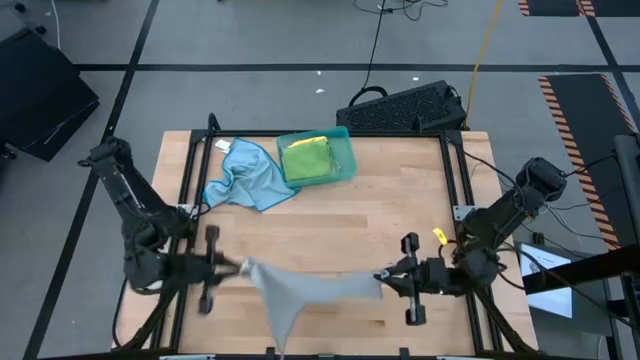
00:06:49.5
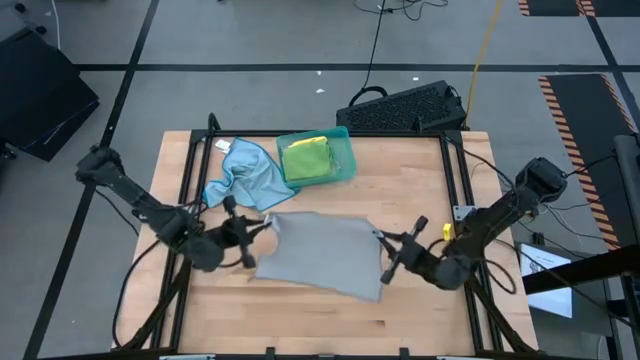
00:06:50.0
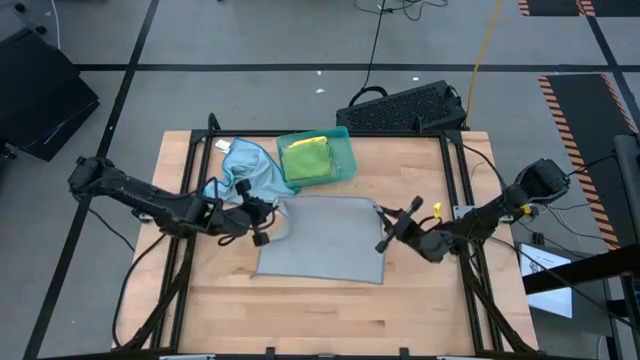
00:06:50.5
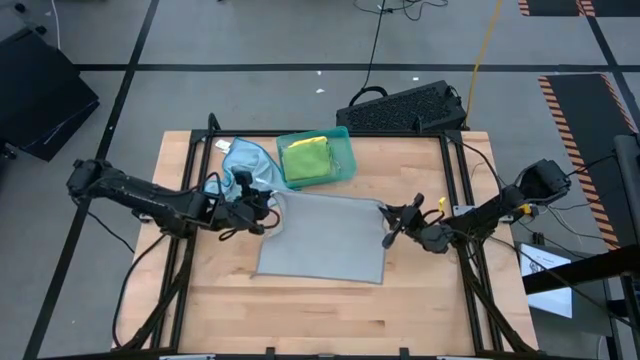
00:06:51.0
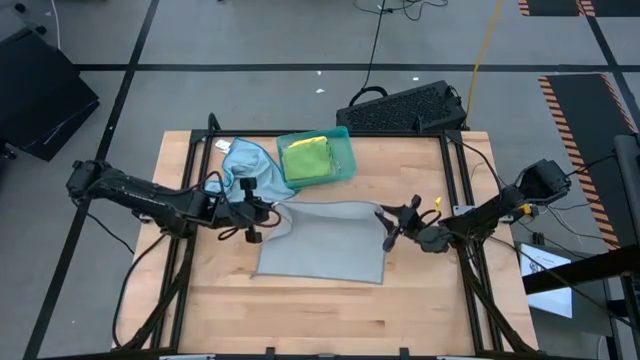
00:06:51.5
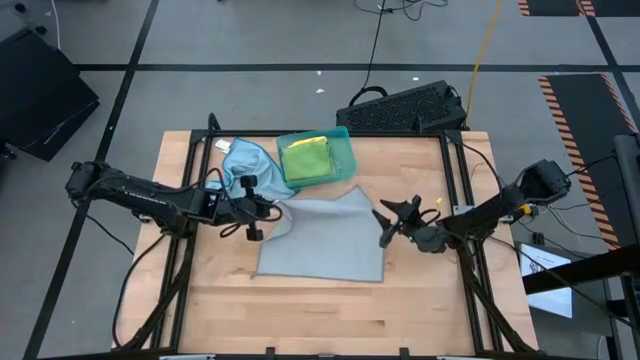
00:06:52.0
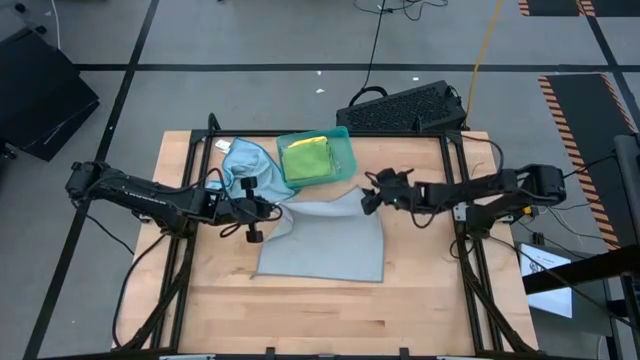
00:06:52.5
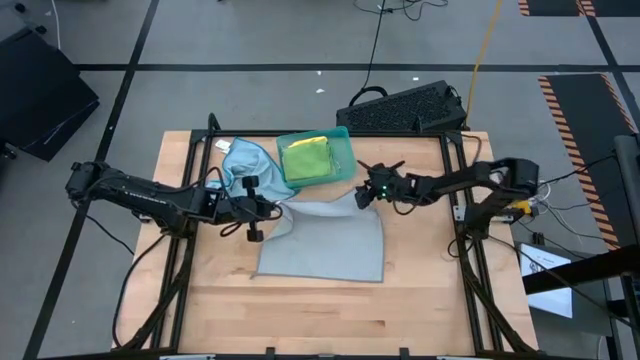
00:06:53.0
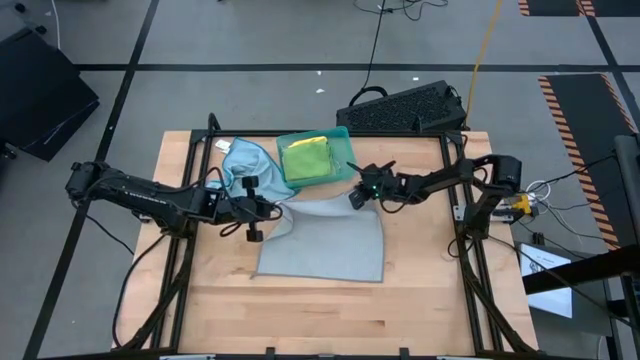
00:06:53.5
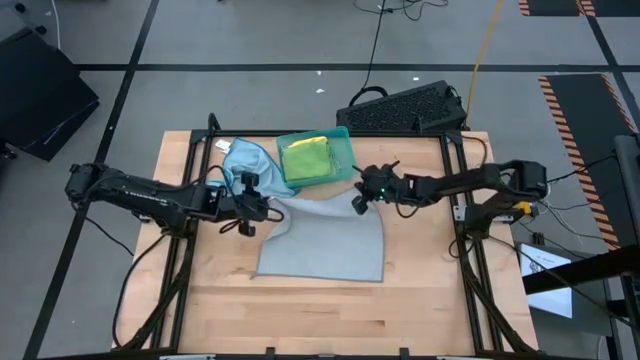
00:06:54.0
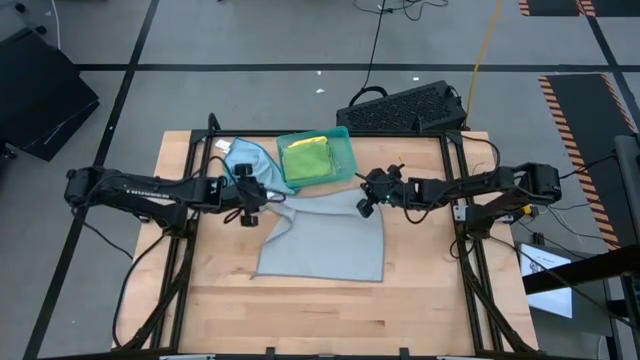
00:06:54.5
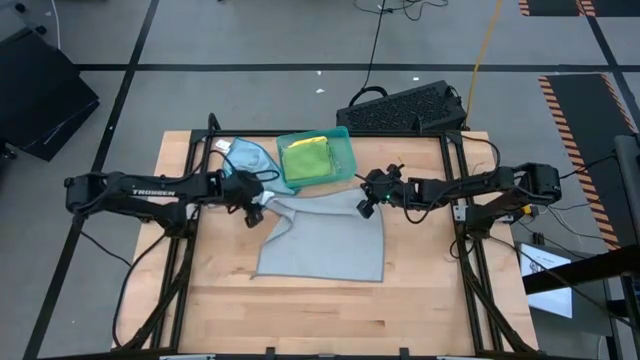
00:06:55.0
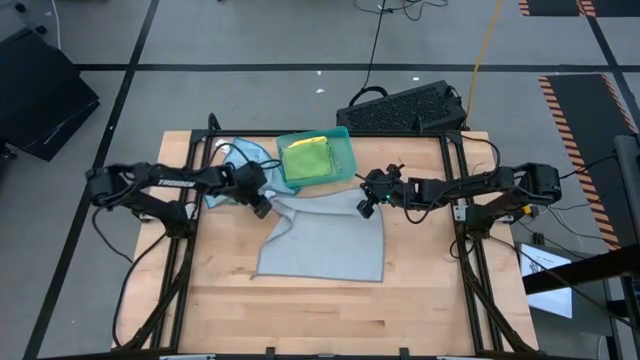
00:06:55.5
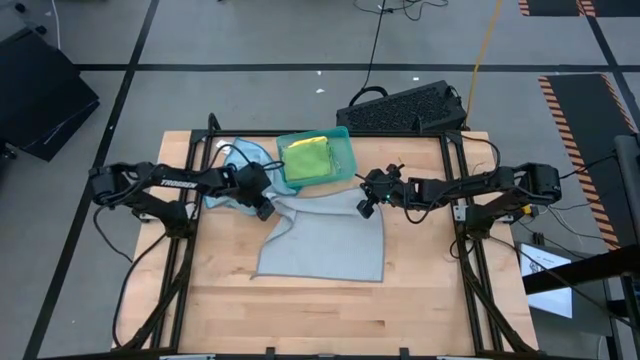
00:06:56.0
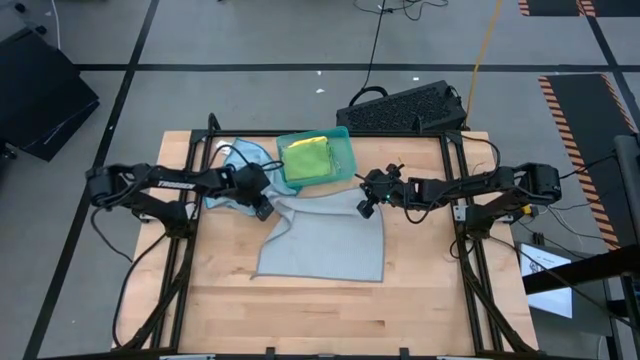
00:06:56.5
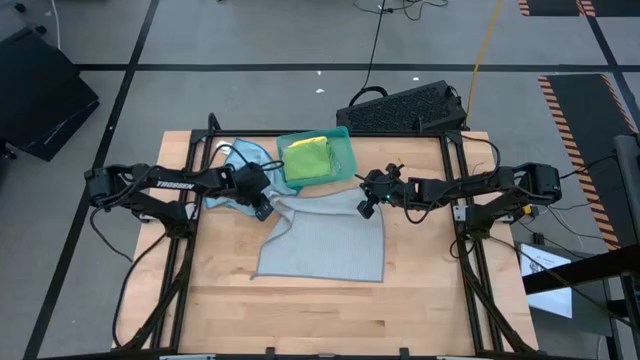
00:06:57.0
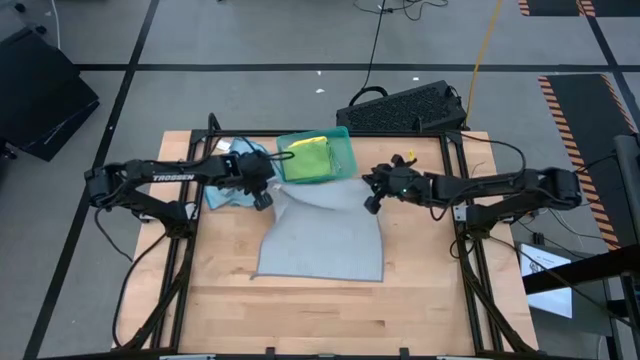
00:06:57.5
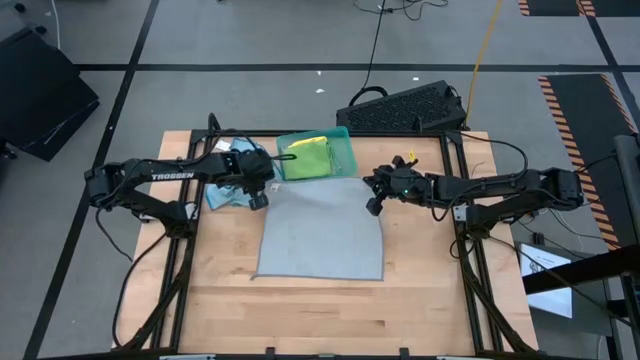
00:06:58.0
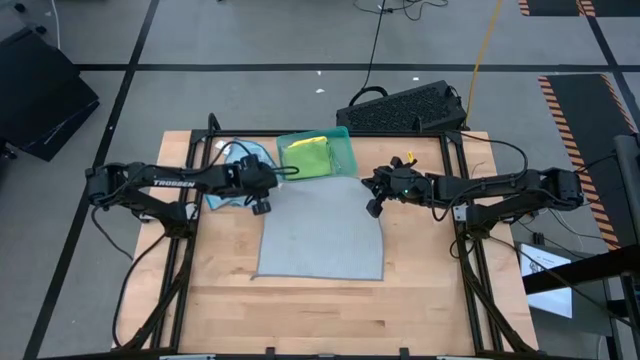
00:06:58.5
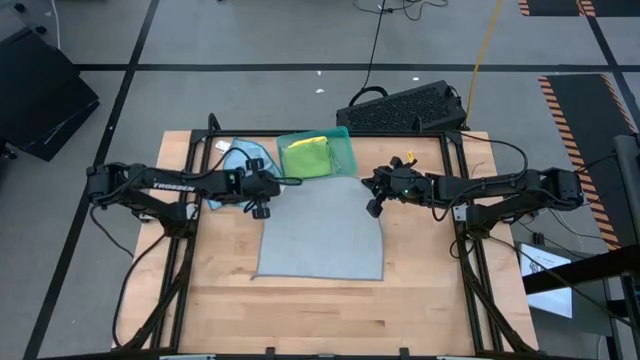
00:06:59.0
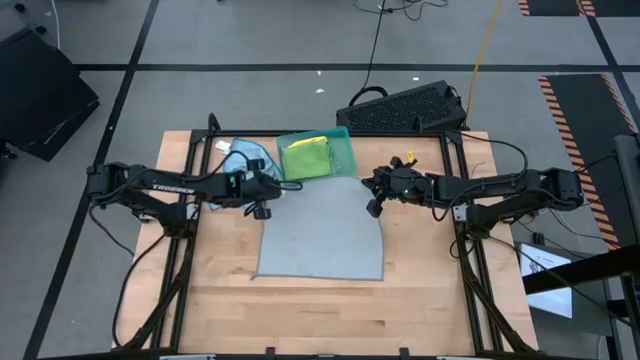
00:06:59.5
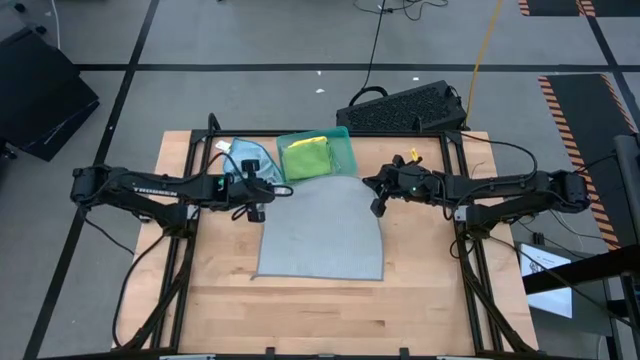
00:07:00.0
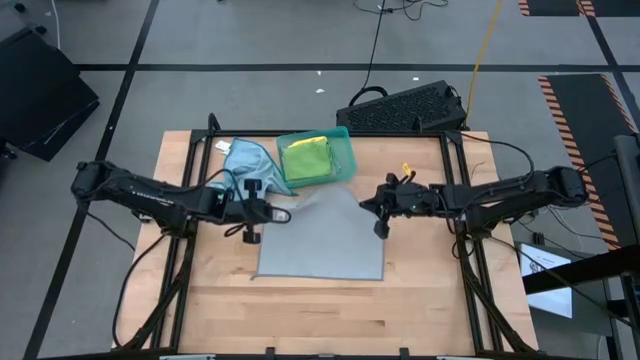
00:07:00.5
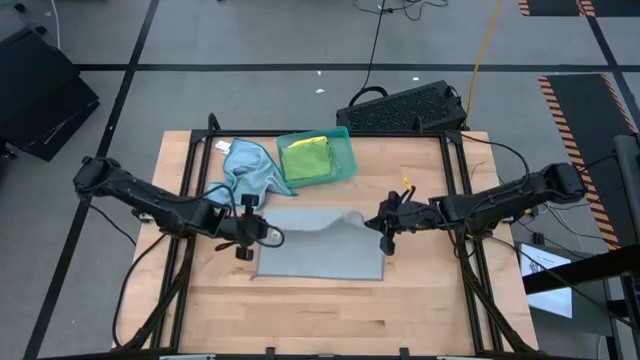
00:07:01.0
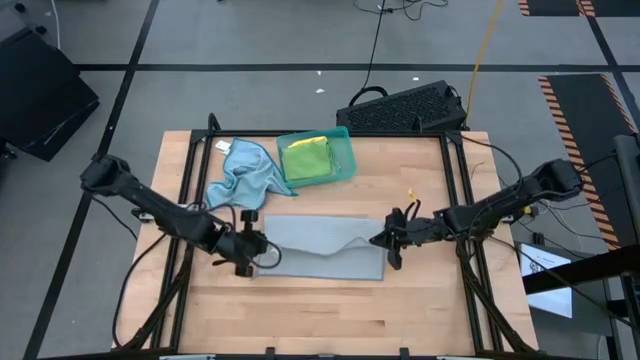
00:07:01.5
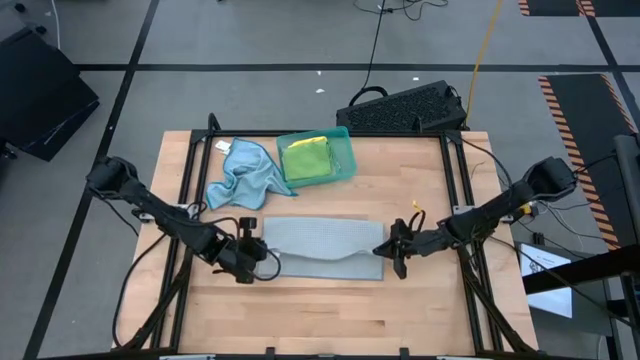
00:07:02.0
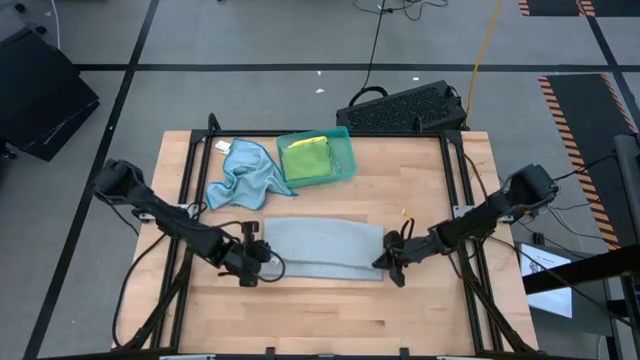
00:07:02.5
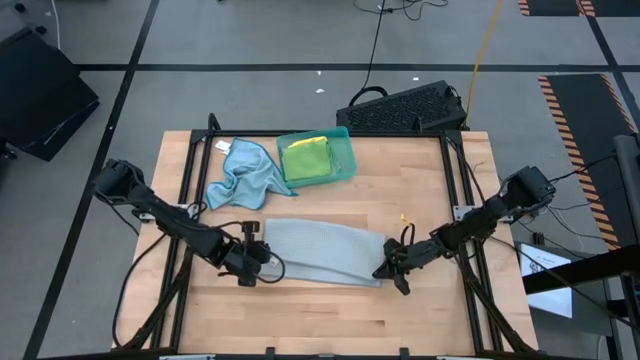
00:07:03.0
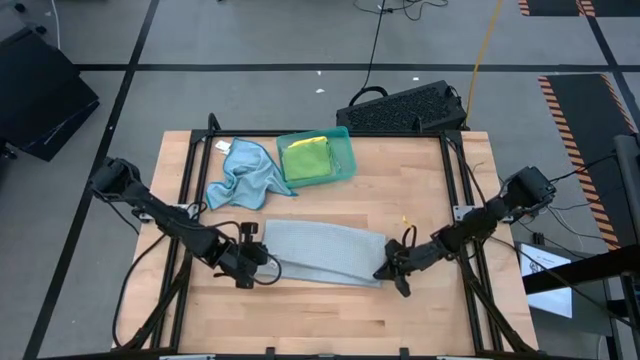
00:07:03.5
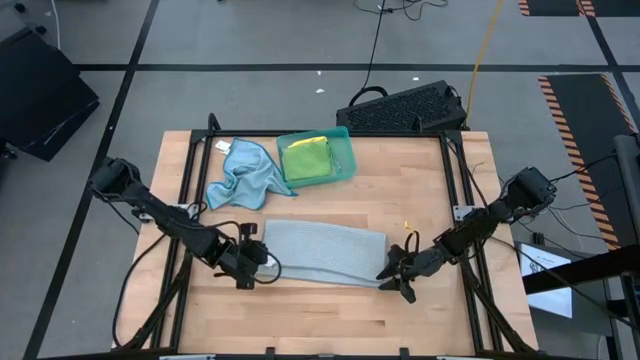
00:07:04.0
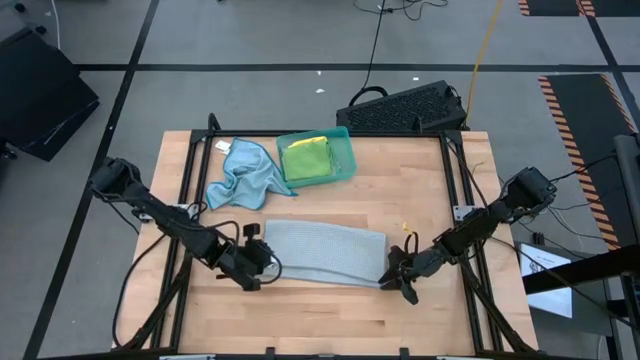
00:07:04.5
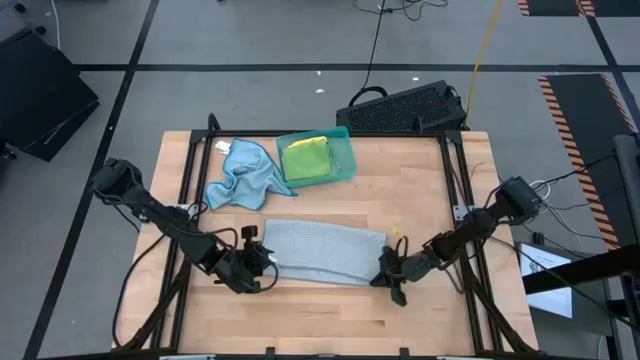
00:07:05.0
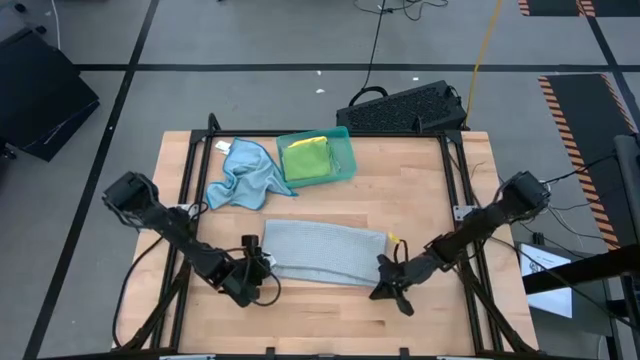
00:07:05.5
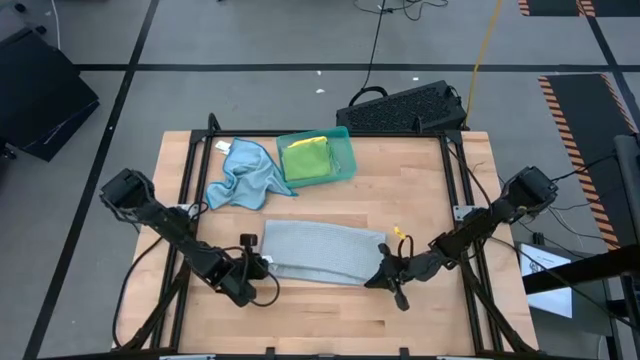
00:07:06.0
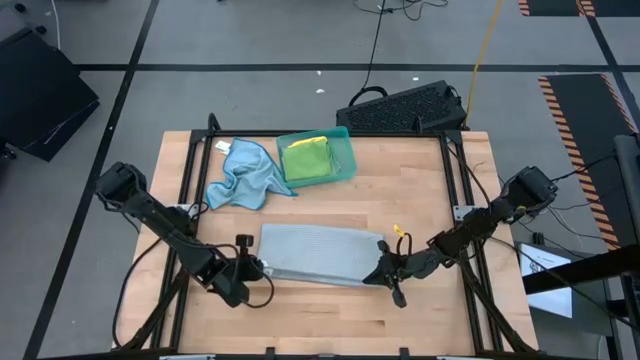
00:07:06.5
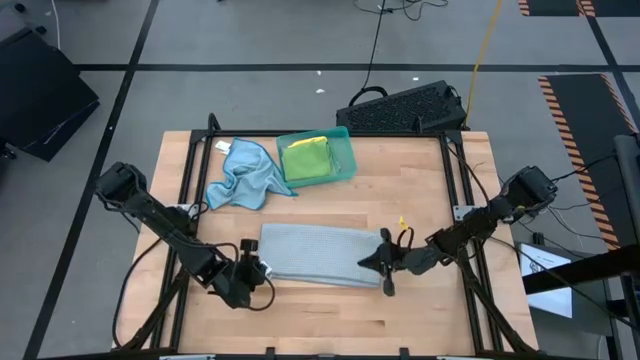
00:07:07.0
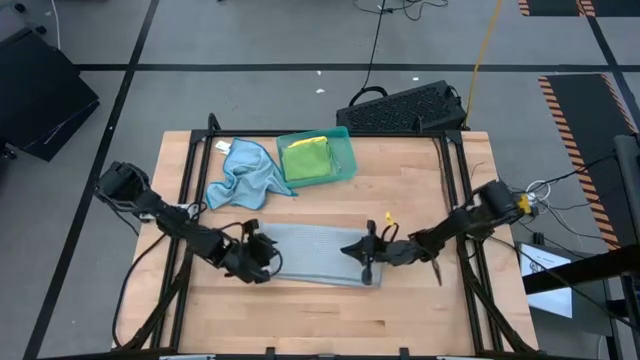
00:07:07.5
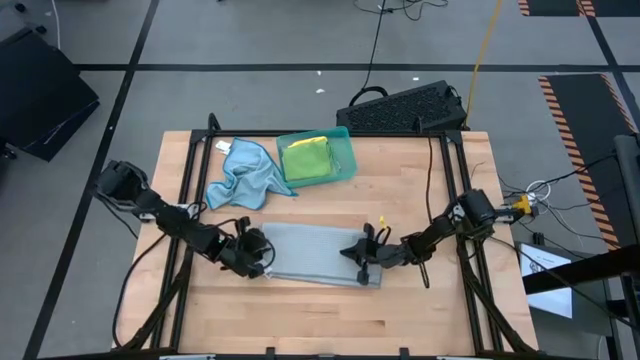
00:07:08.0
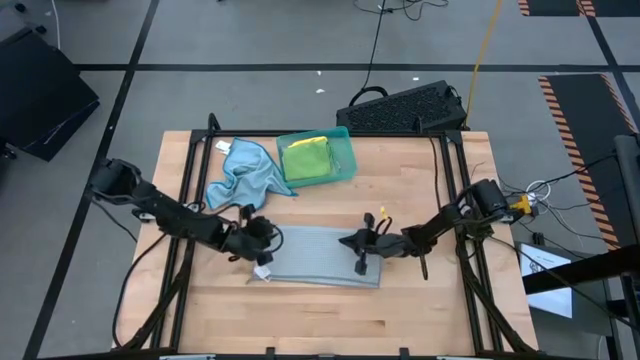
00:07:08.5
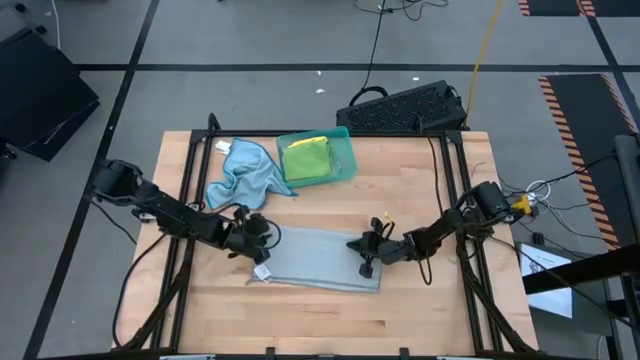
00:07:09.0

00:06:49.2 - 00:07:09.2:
Task: Fold microfiber towels
Fold the gray microfiber cloth

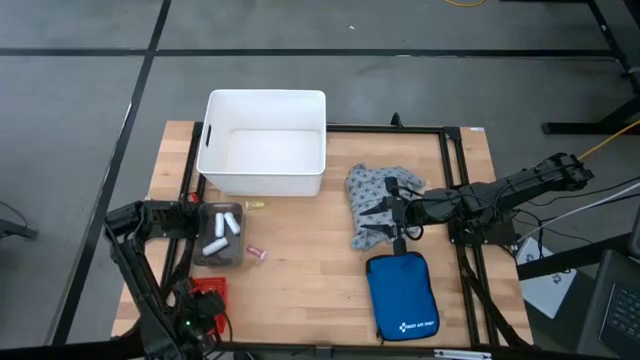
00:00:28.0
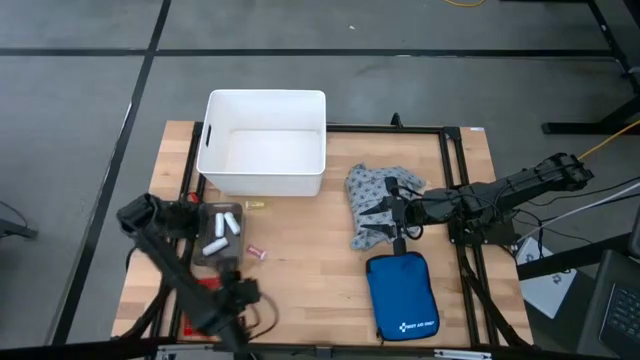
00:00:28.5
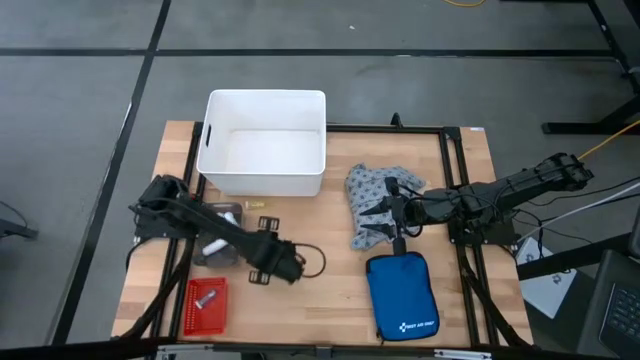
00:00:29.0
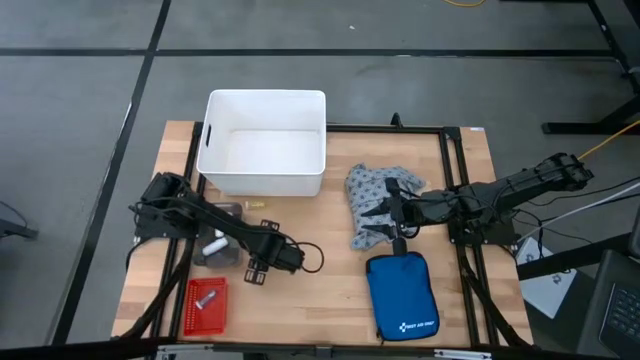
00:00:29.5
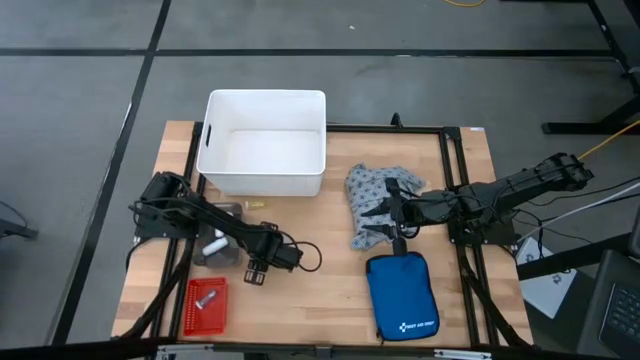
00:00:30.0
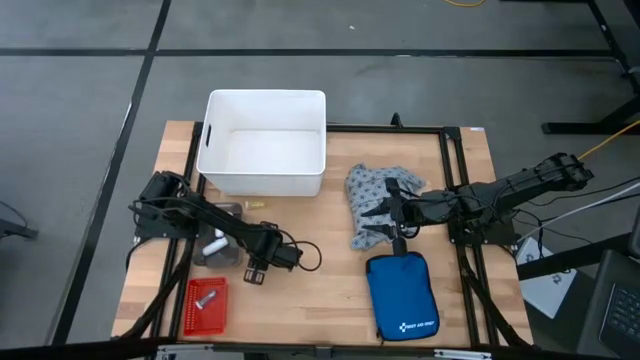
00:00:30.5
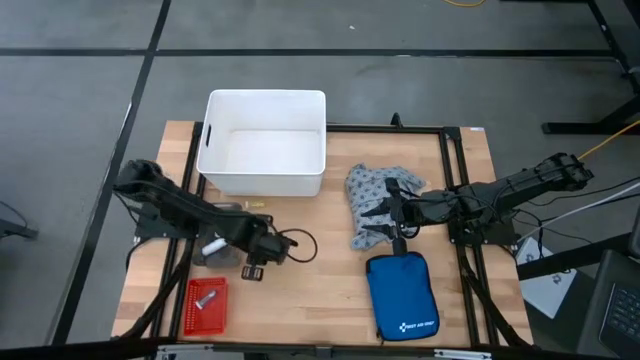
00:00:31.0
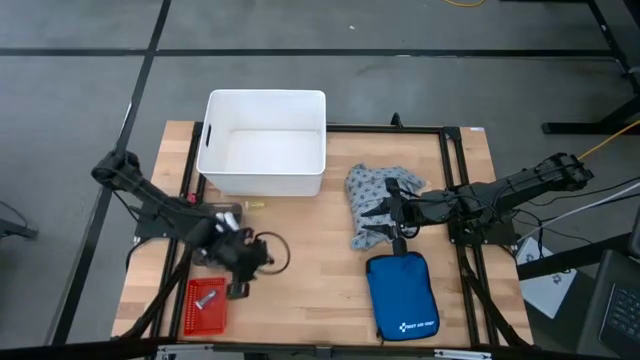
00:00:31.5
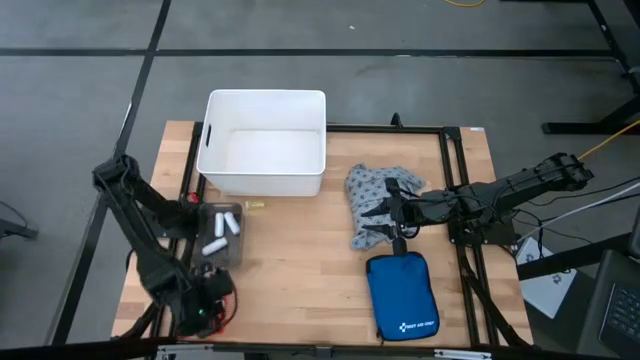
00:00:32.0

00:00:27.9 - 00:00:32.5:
Task: Pick & place medical supplies in basket/bin
Put the purple pill bottle into the red bin
